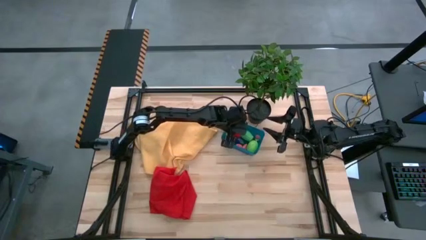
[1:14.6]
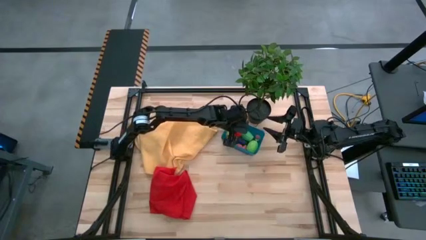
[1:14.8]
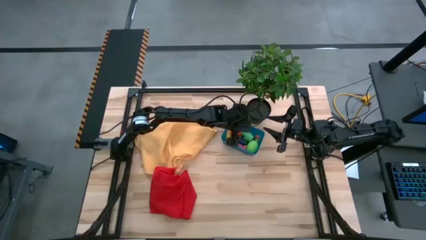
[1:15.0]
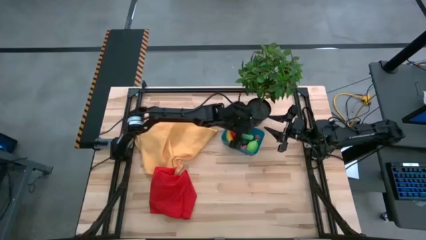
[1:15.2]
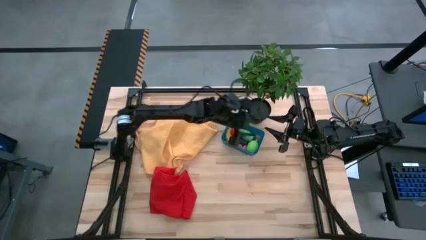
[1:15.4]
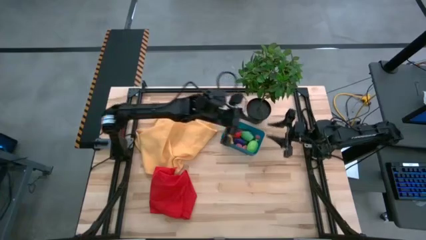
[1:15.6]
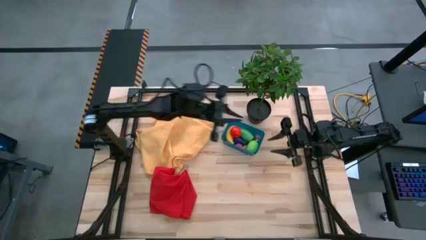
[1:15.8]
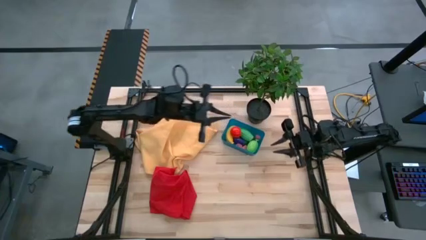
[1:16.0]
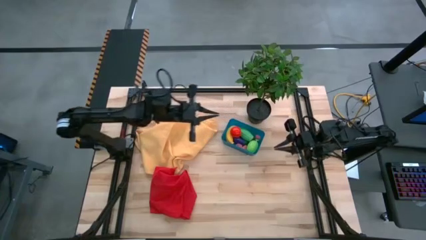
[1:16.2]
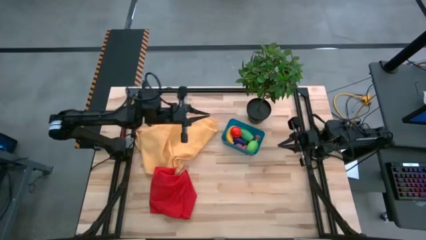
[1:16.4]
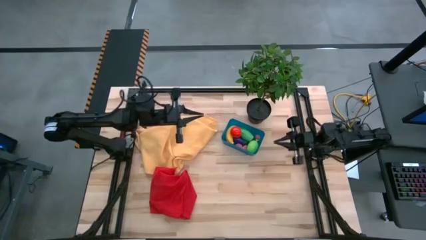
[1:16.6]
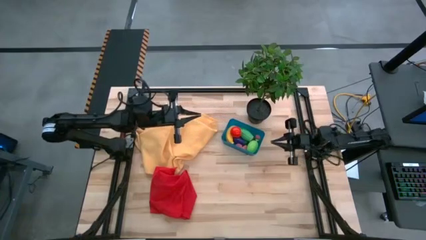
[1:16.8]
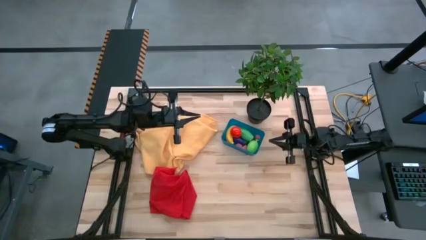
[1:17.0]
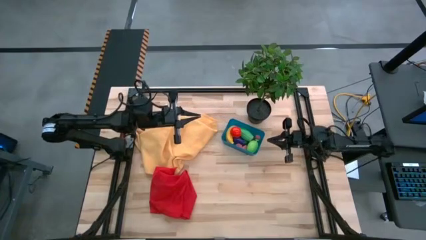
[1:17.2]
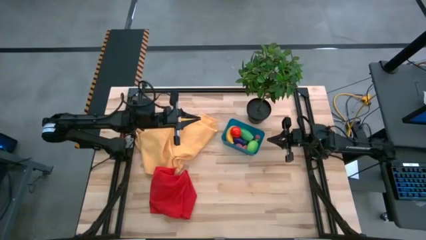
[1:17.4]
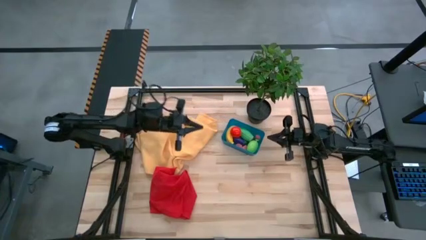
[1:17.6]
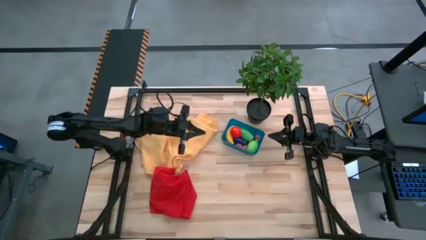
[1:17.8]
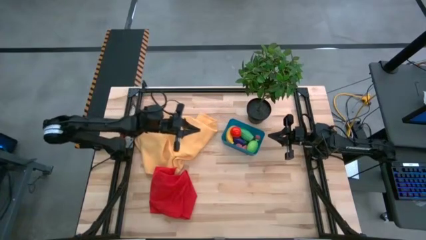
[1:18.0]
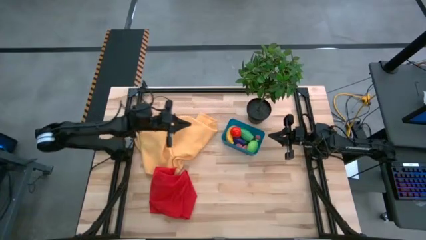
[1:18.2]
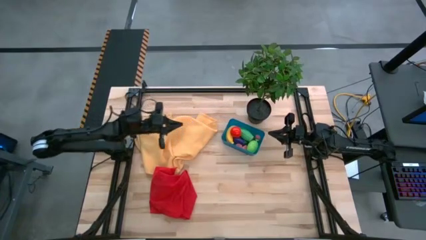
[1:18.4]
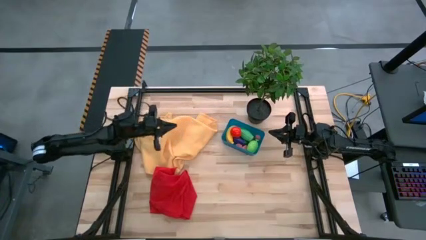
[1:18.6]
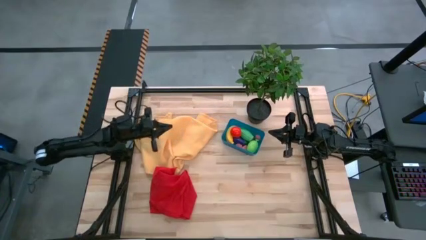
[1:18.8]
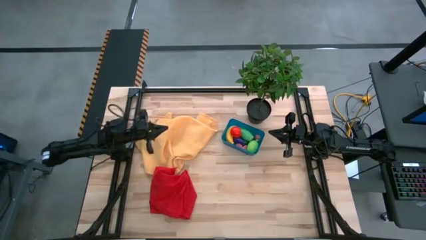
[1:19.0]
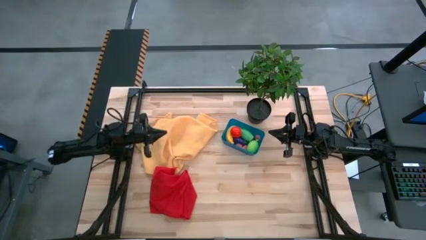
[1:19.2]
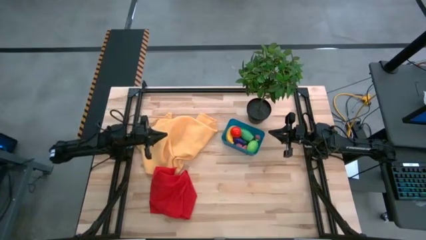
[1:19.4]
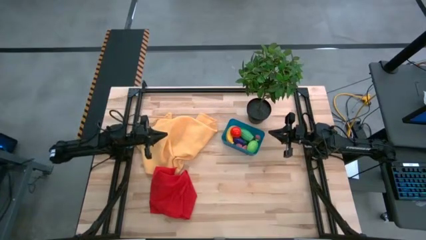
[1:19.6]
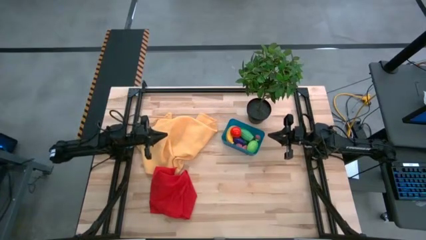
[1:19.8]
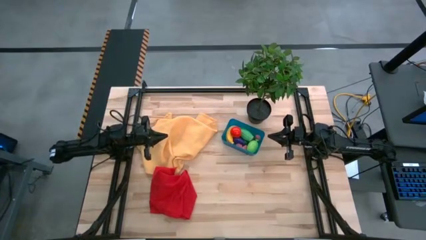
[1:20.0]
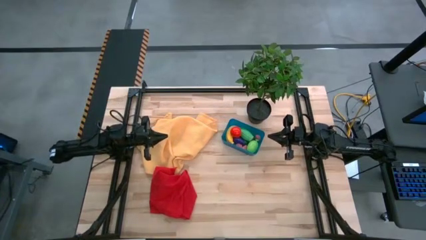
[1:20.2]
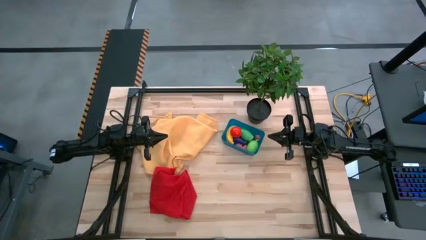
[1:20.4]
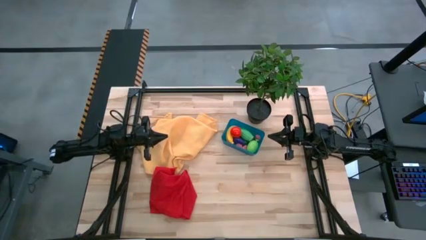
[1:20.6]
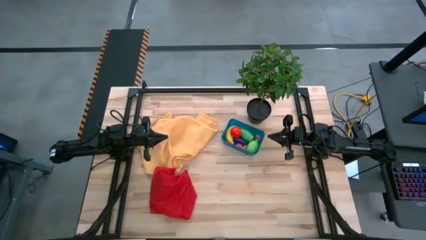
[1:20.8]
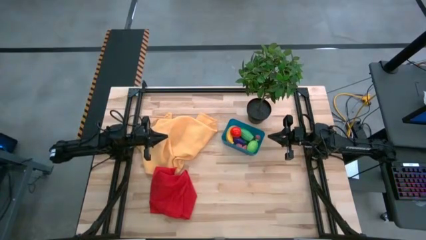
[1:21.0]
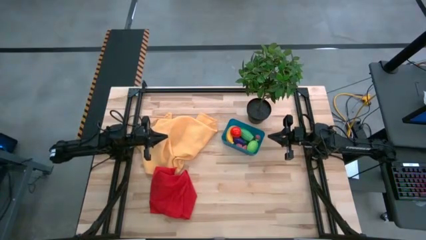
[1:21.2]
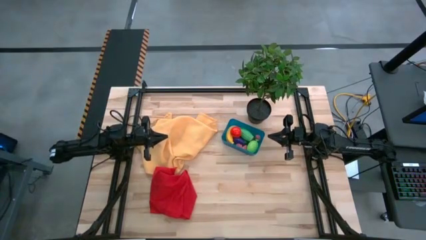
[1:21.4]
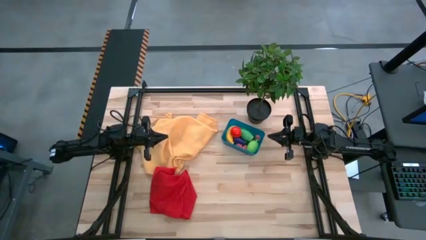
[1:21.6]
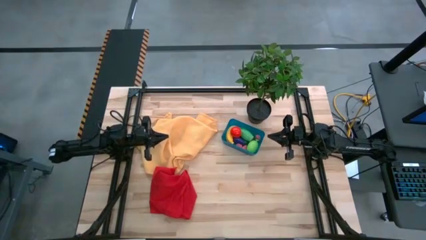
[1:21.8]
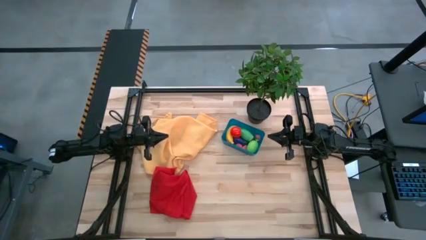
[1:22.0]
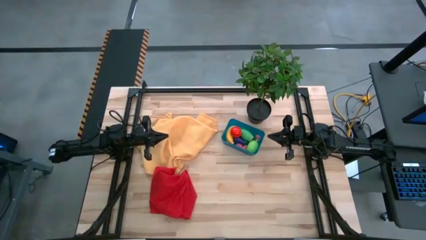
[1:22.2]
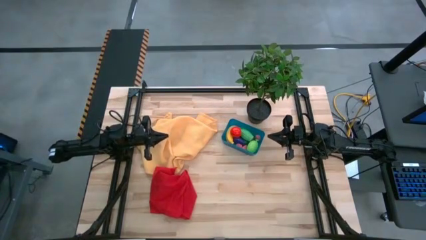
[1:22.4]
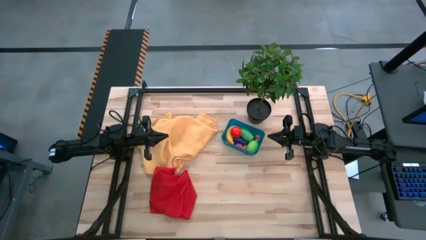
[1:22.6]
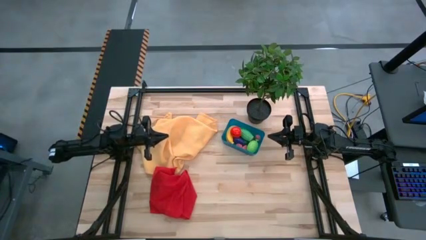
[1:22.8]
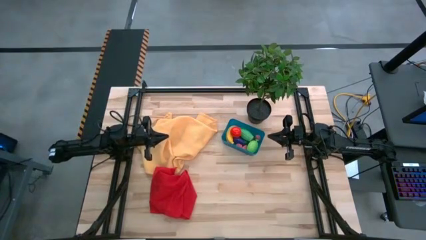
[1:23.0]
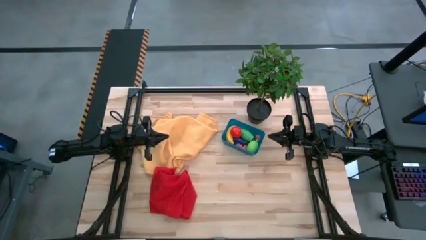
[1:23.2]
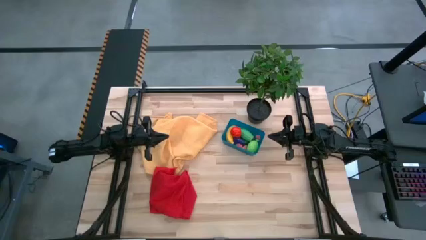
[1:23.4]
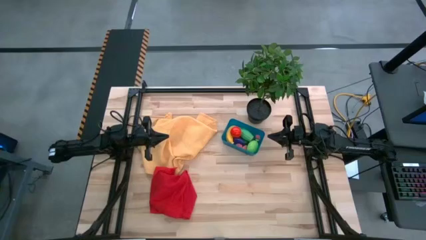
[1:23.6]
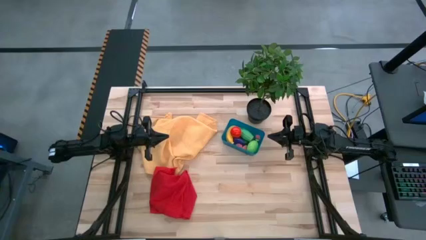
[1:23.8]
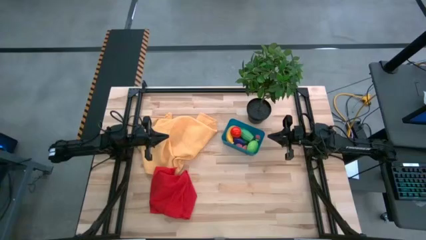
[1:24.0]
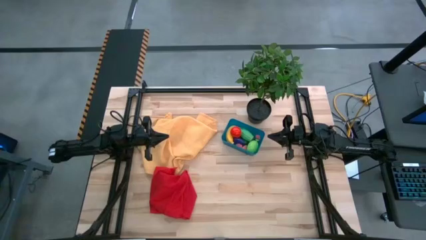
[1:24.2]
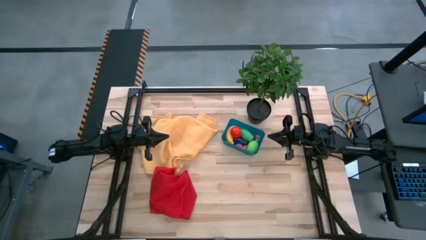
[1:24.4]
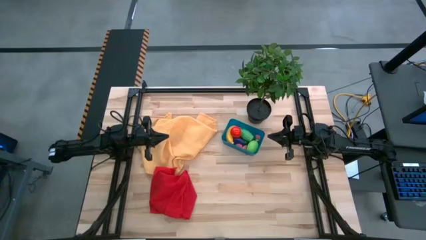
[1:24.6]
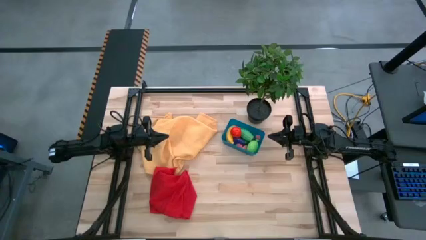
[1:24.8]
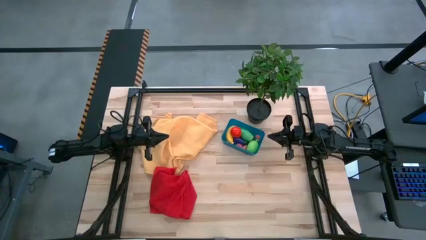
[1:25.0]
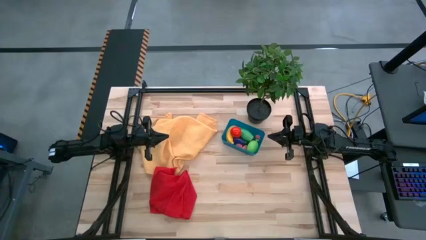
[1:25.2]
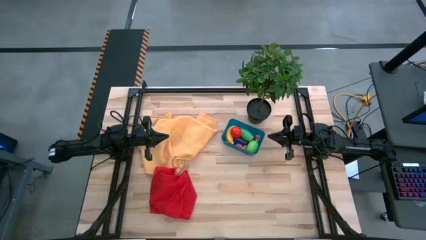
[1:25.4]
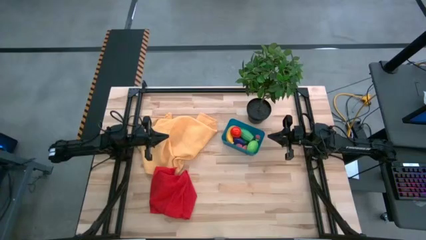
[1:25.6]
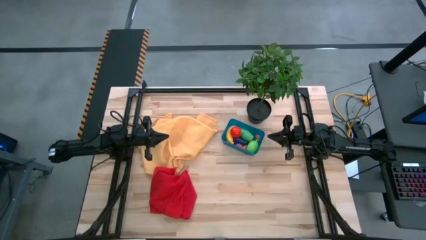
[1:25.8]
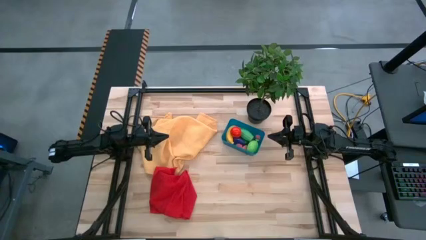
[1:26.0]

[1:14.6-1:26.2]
Task: Pick and placing Produce into tupperware
Return to Home Position

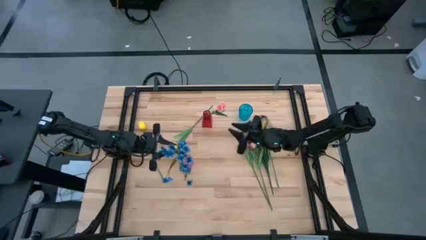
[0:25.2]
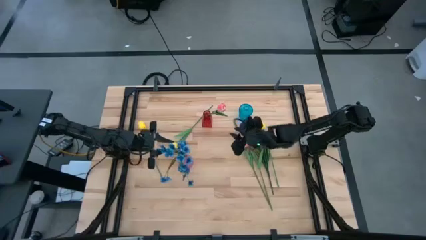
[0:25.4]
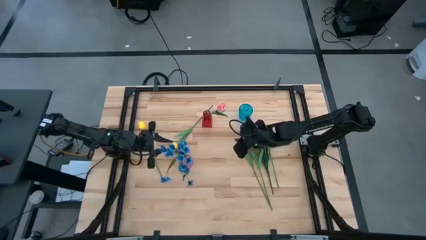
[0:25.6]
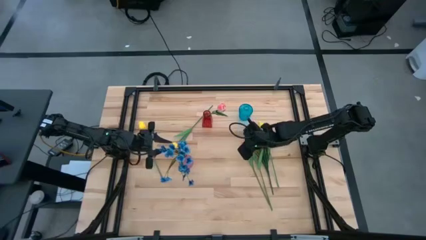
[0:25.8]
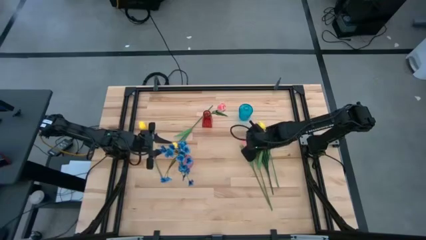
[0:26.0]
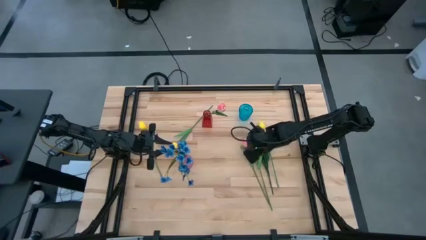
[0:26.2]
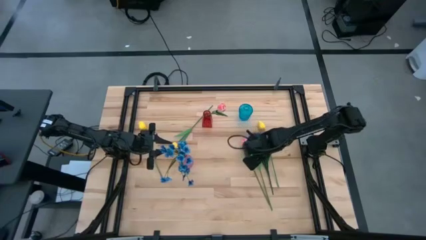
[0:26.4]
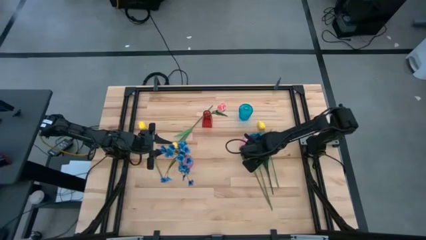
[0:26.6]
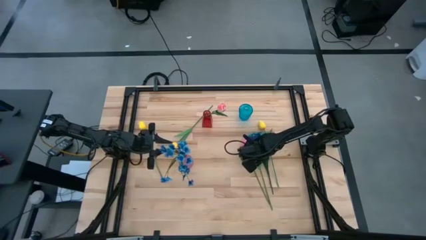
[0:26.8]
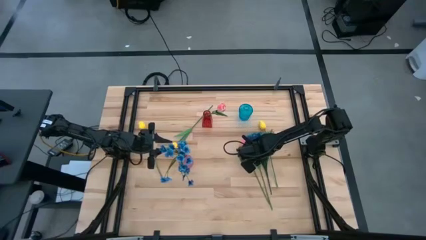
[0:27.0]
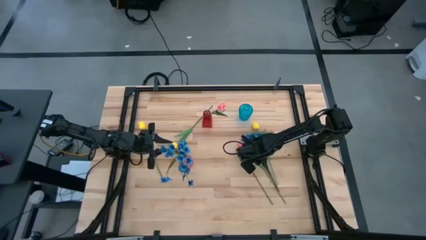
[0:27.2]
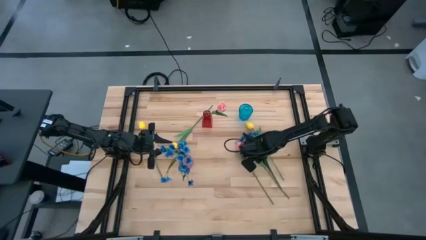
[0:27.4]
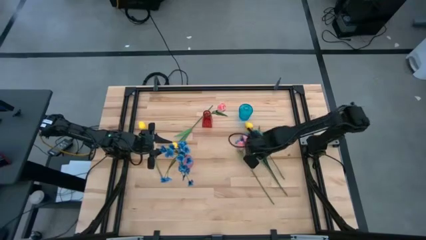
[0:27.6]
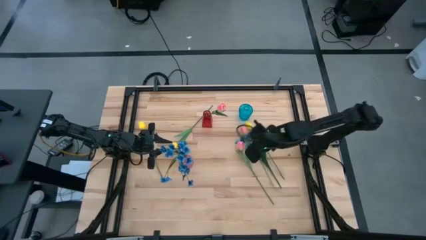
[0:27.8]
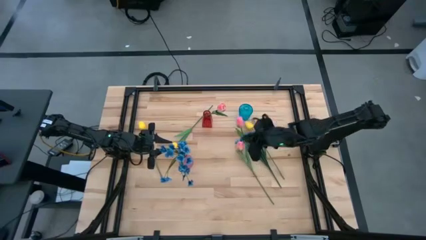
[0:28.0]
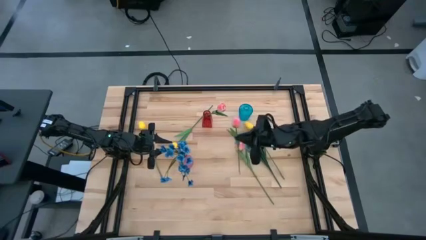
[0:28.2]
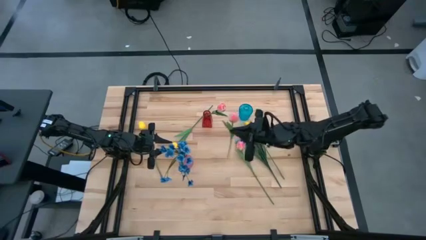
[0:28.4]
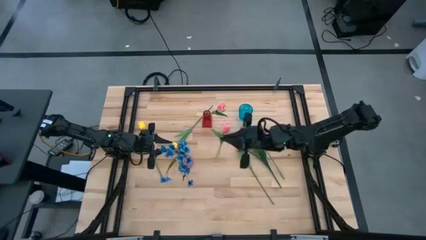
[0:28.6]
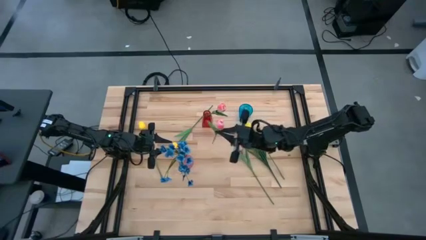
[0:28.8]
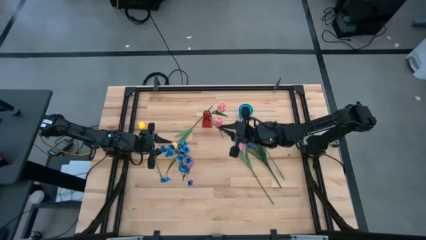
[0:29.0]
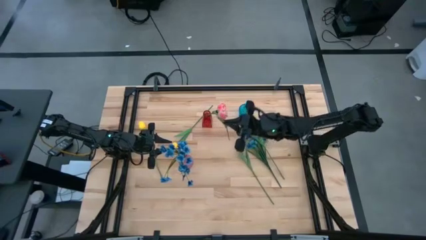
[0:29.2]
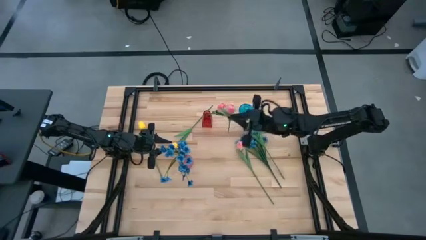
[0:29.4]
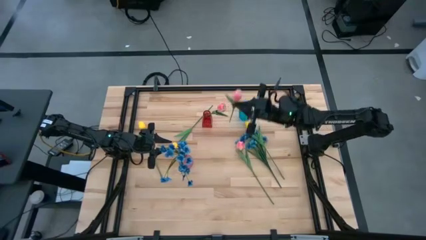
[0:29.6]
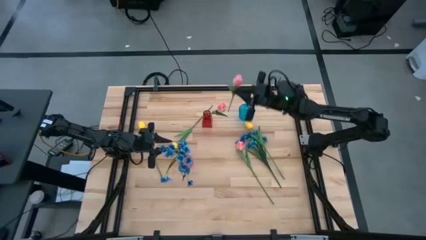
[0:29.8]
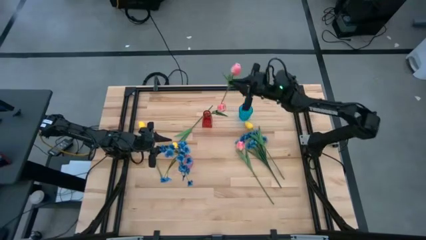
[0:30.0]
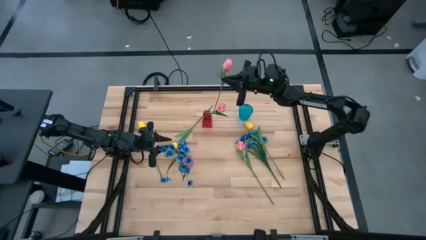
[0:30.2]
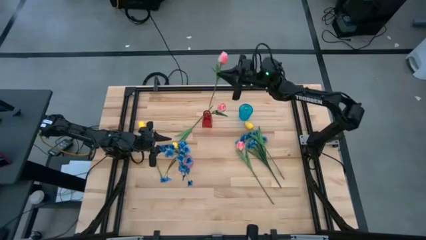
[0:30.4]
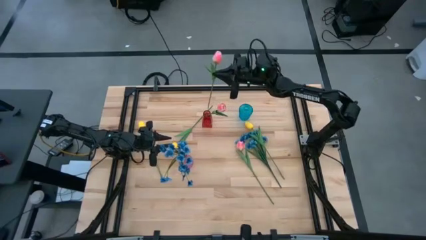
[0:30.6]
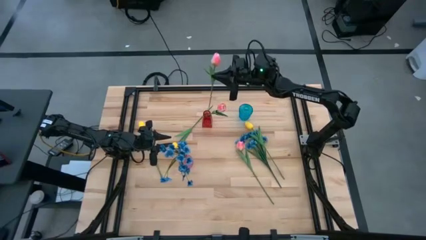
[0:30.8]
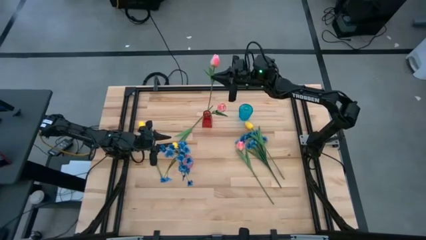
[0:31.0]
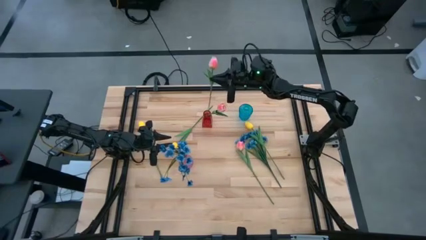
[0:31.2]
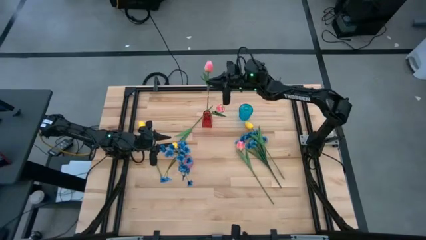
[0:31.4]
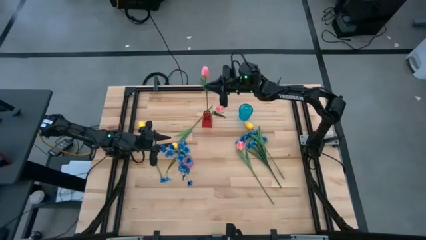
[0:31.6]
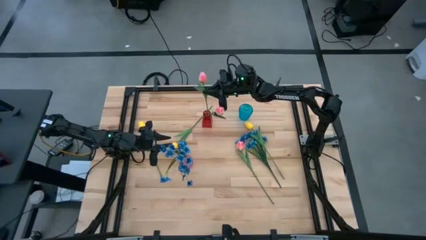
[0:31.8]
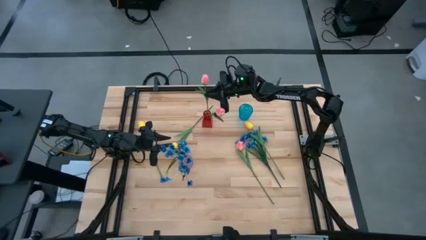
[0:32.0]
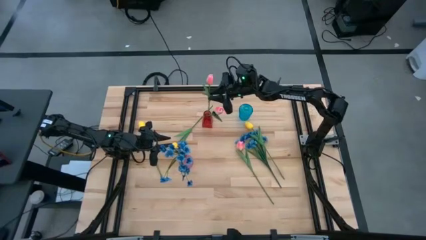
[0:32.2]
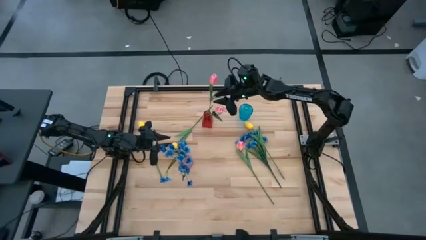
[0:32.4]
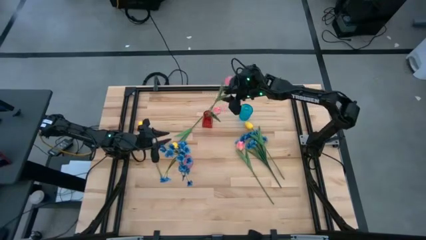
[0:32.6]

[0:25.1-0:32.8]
Task: Sort flowers into vase by color
Put the pink flower into the red vase
